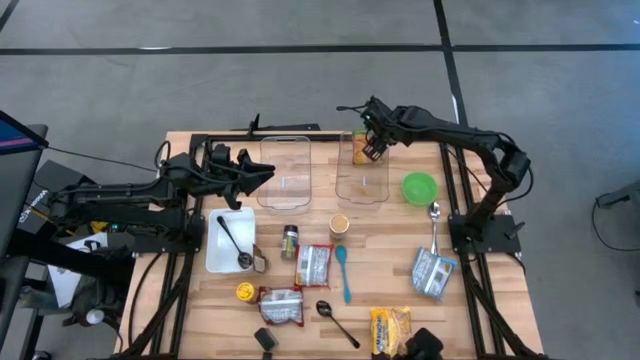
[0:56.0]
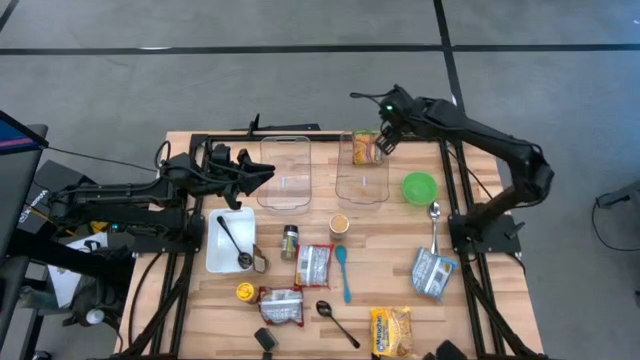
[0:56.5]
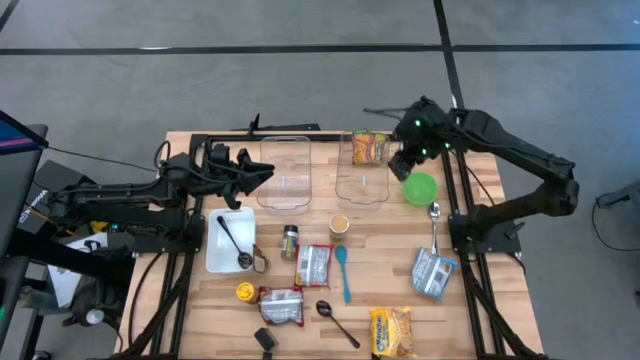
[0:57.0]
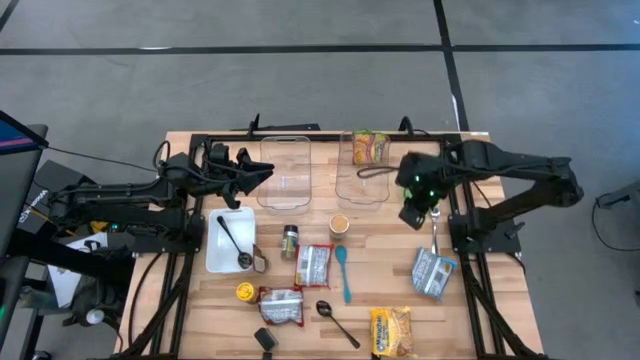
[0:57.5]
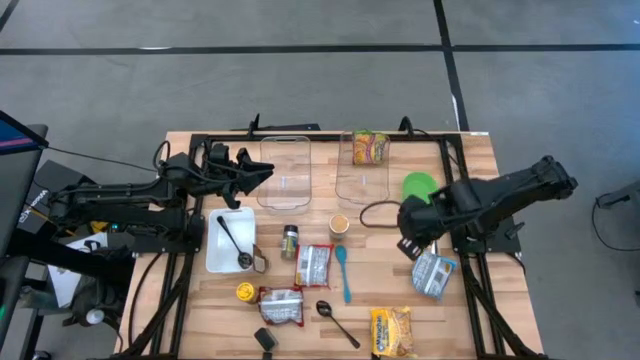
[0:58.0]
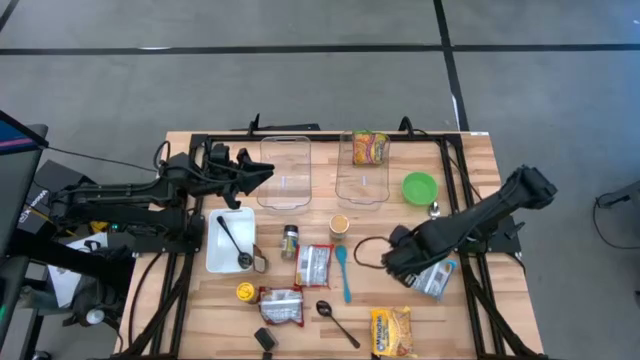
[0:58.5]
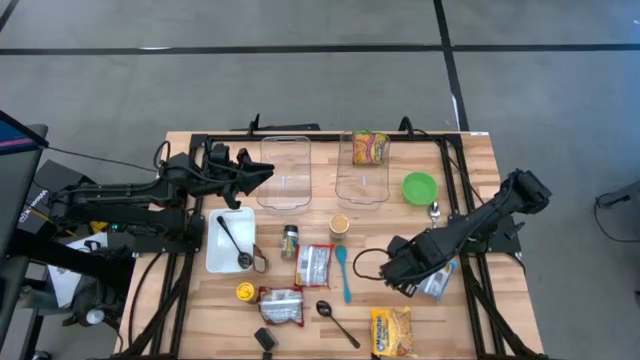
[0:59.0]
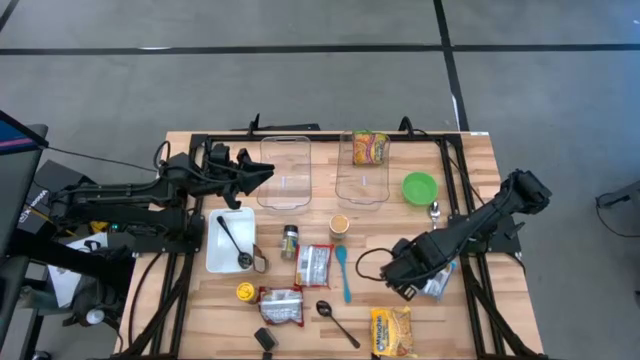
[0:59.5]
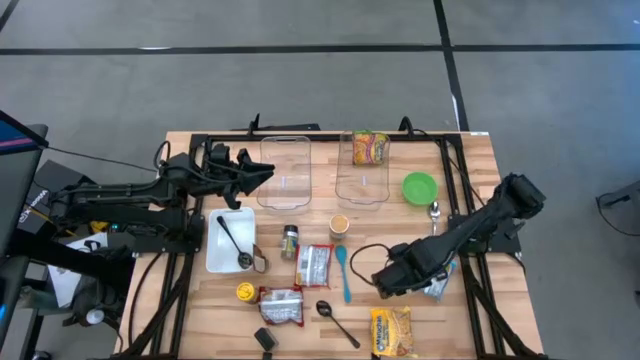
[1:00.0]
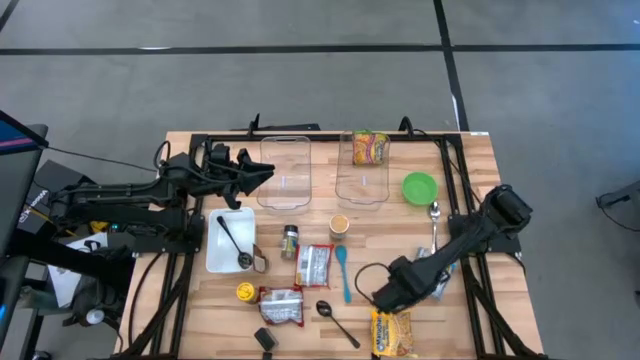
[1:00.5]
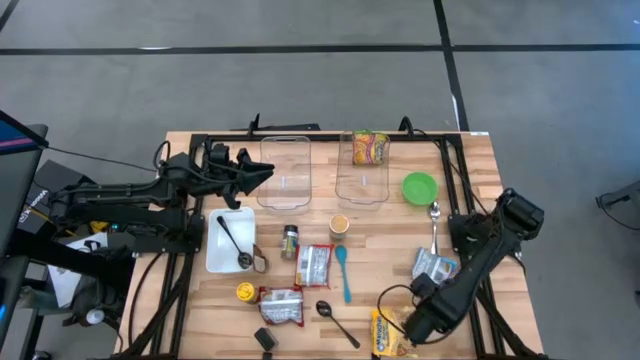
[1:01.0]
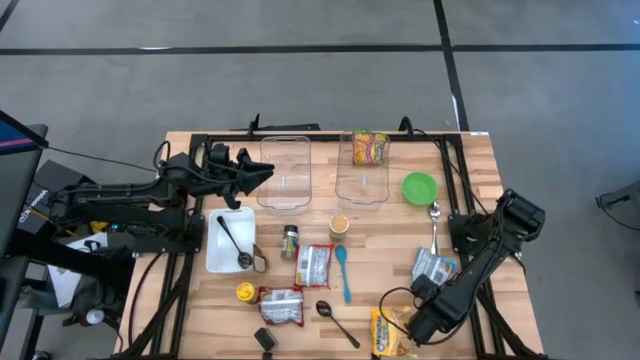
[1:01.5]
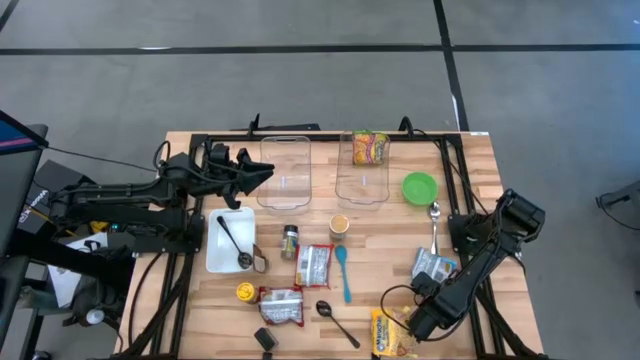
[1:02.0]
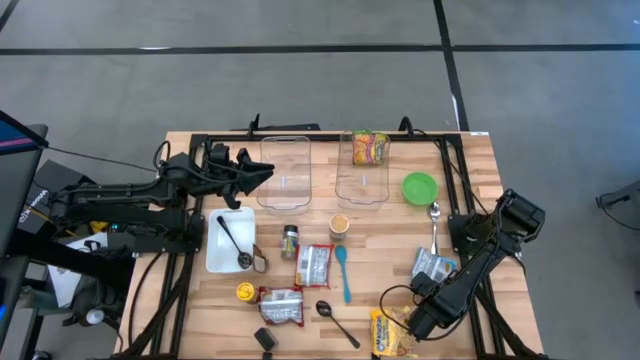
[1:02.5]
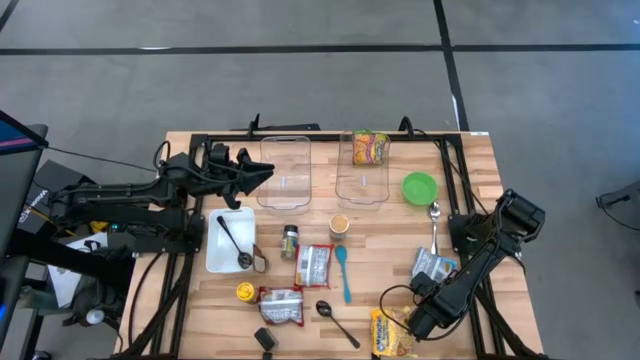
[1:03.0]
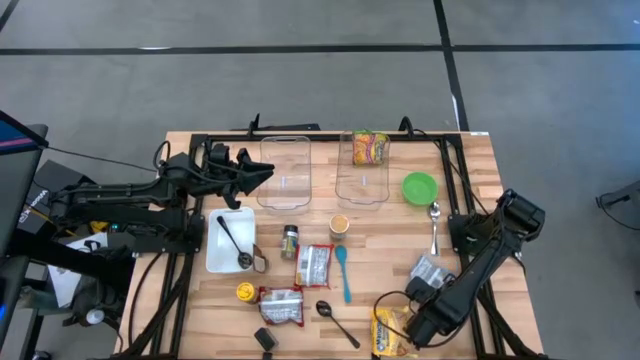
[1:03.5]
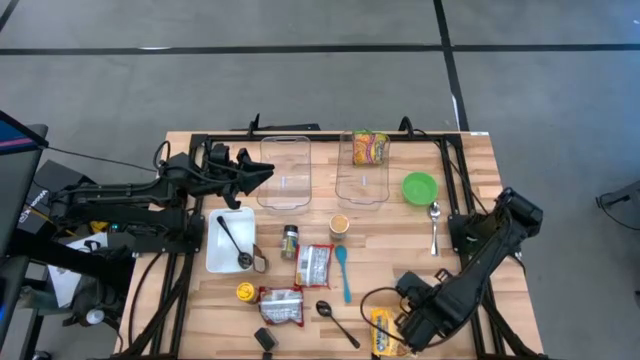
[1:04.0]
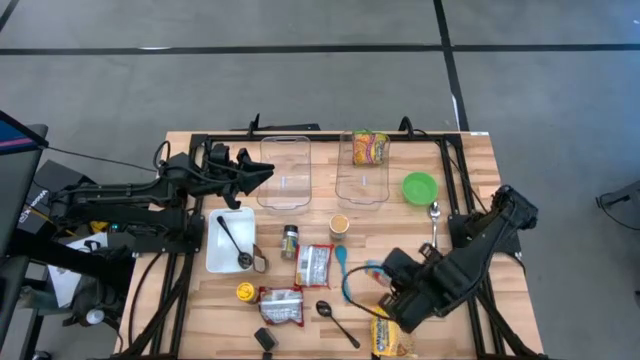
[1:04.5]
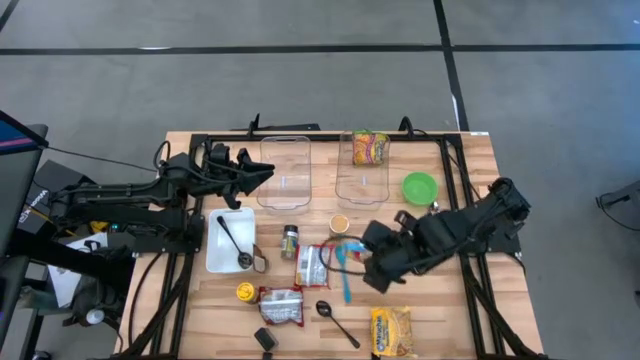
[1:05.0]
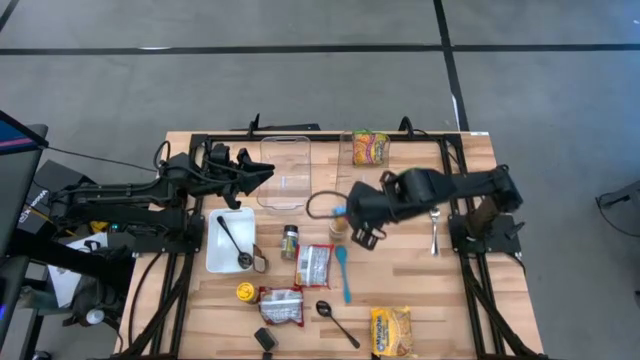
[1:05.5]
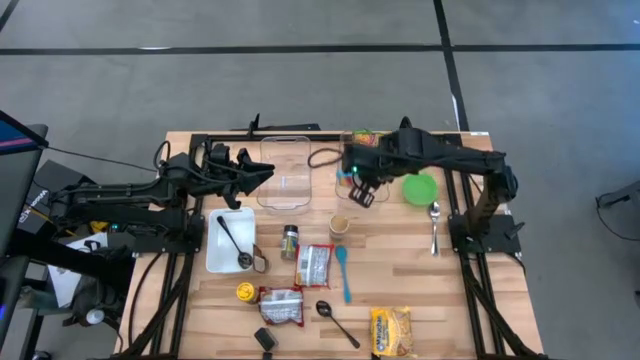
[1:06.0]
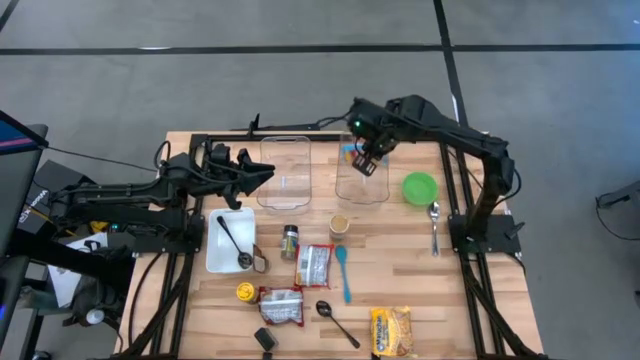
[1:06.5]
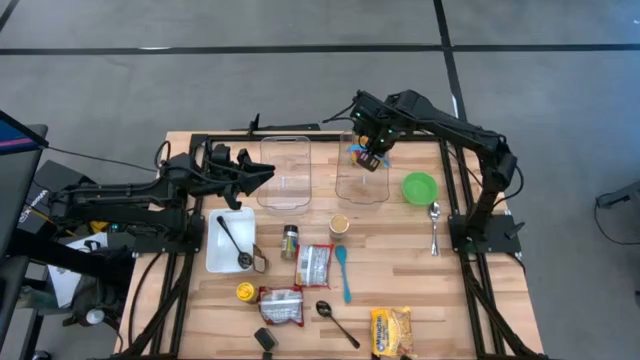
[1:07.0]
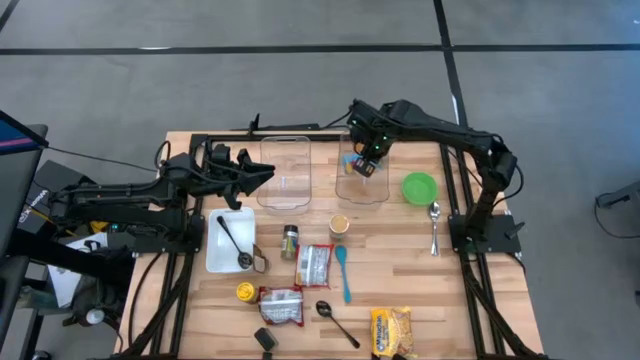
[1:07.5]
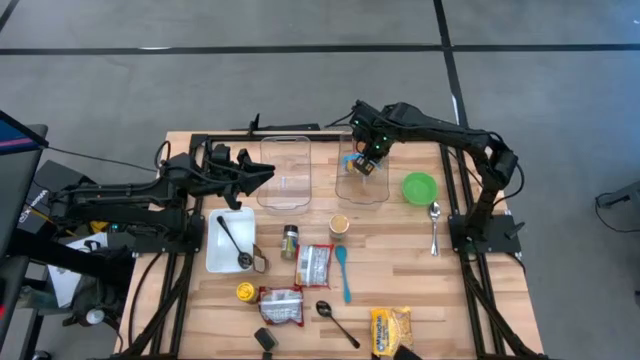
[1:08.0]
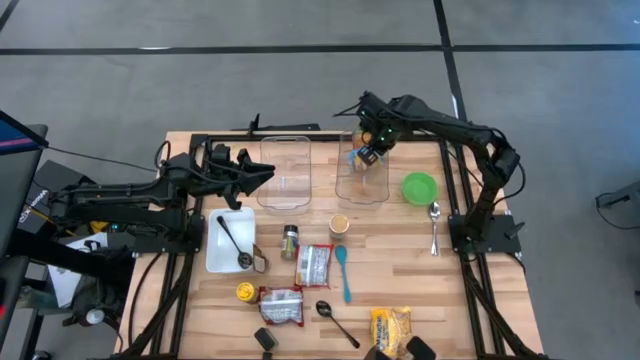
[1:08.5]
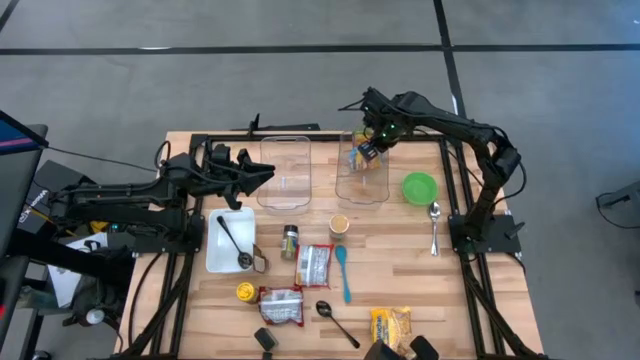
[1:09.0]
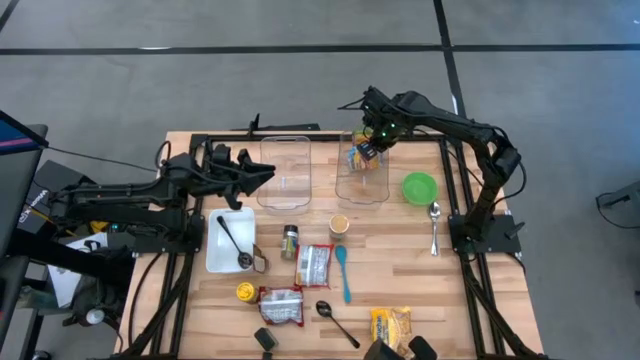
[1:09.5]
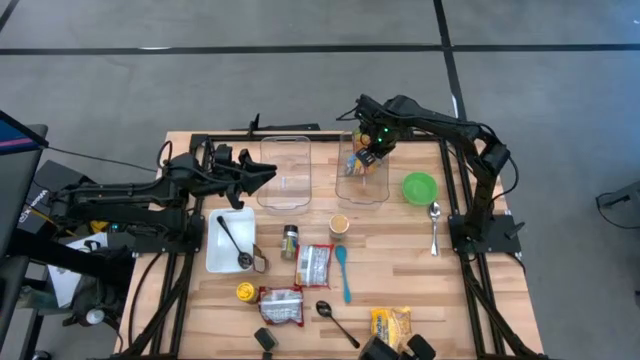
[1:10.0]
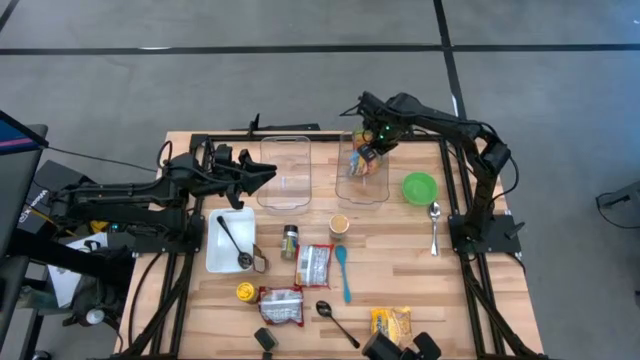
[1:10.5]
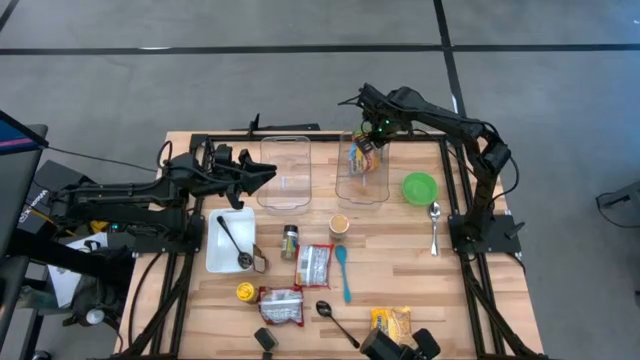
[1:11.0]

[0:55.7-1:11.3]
Task: Pick & Place Food Item
Put the blue noodle pack into the right transparent bin

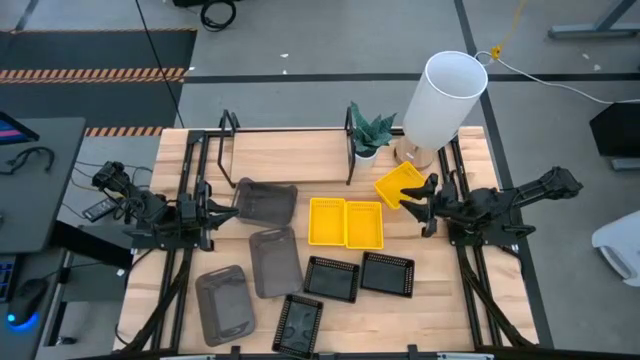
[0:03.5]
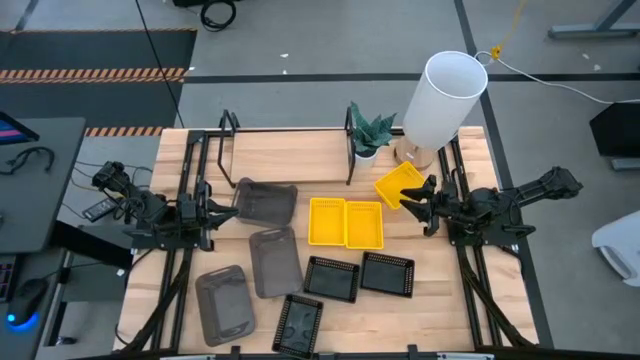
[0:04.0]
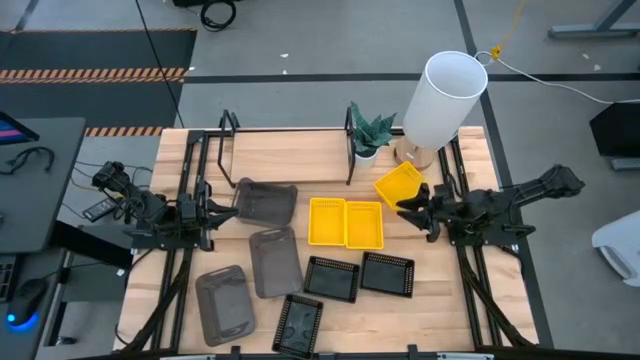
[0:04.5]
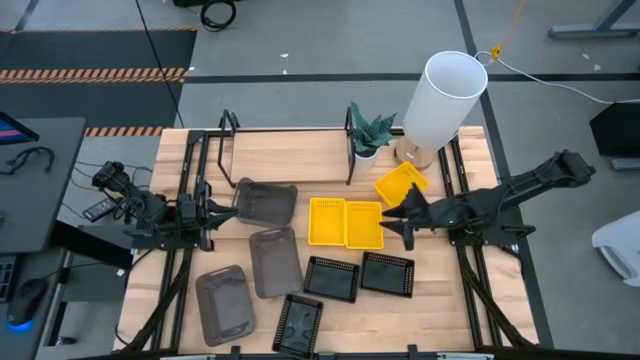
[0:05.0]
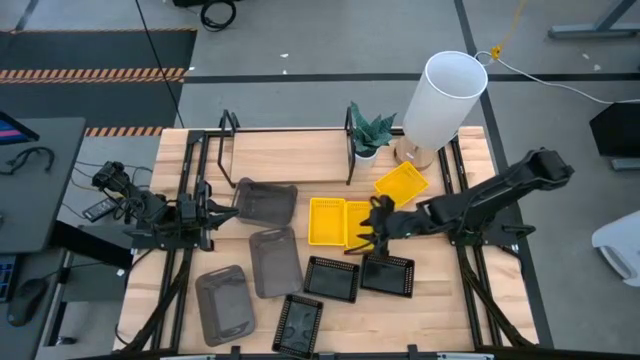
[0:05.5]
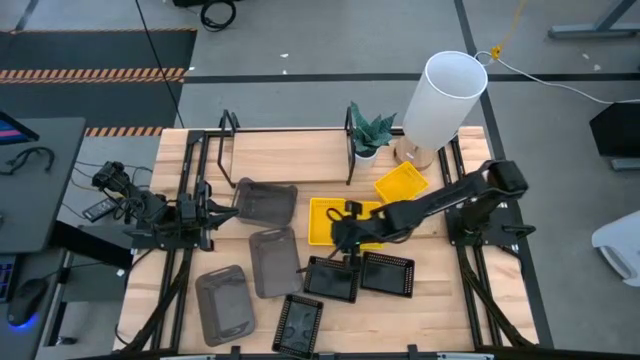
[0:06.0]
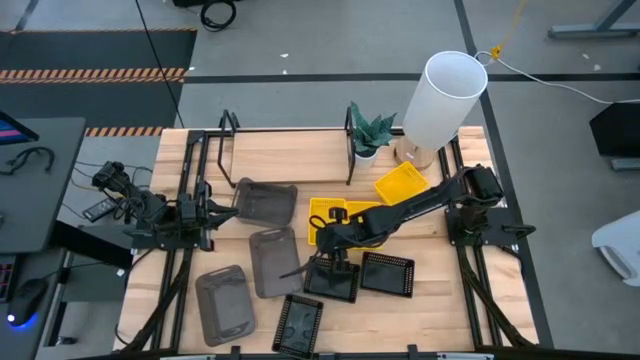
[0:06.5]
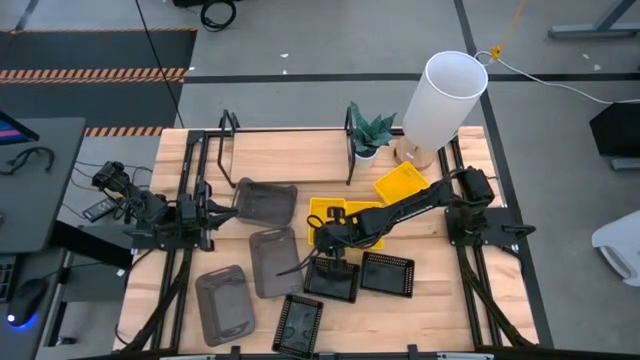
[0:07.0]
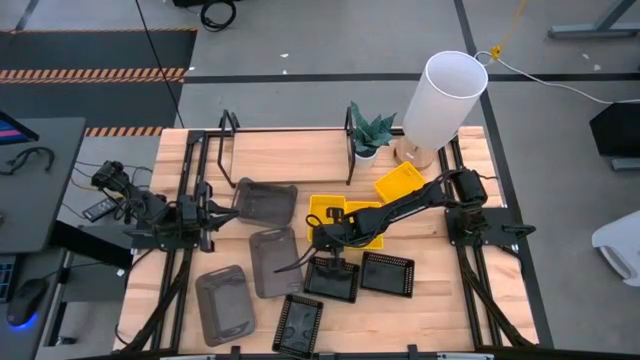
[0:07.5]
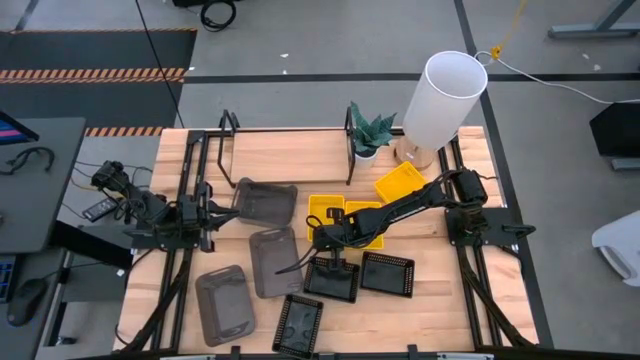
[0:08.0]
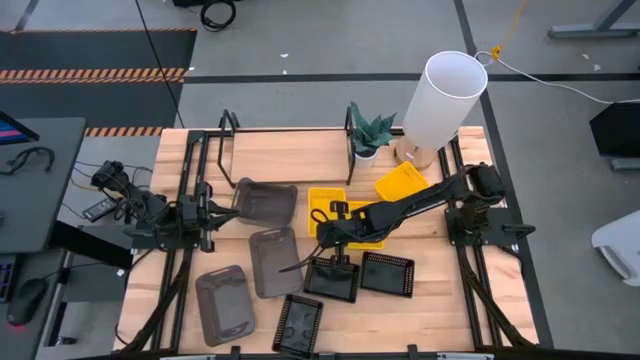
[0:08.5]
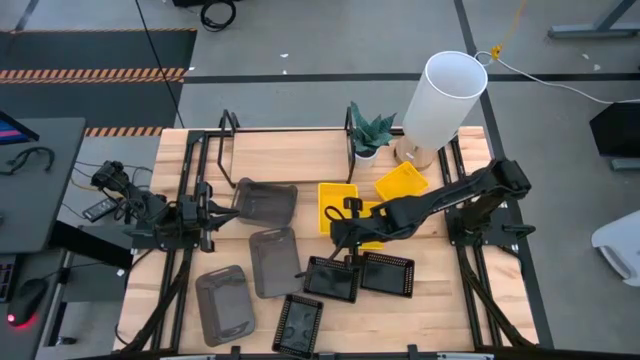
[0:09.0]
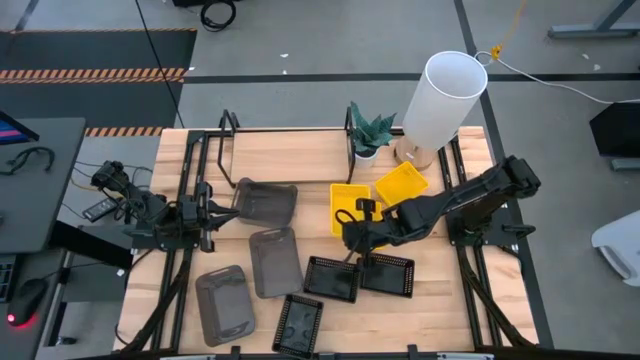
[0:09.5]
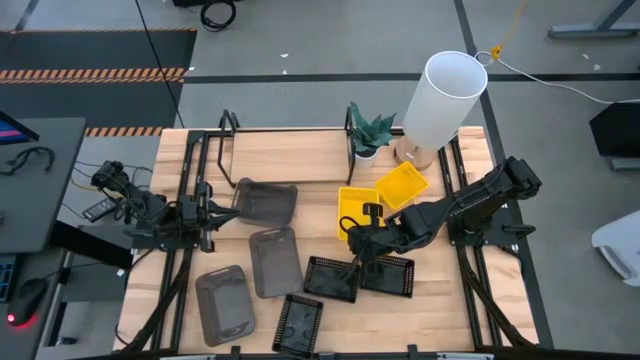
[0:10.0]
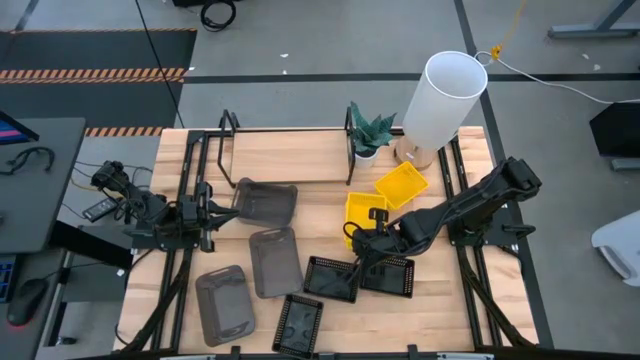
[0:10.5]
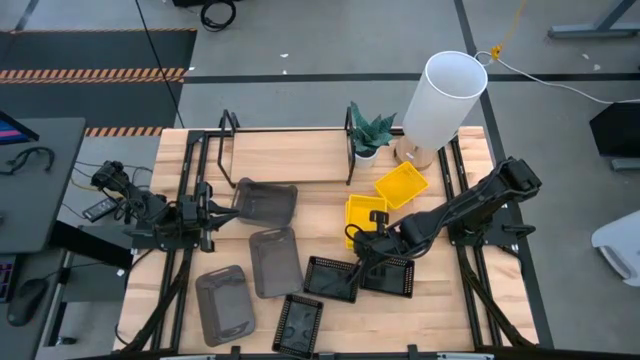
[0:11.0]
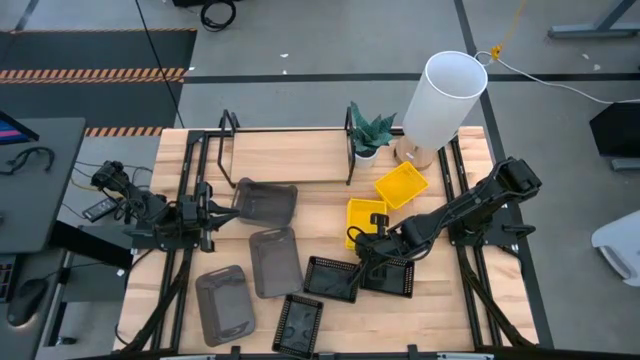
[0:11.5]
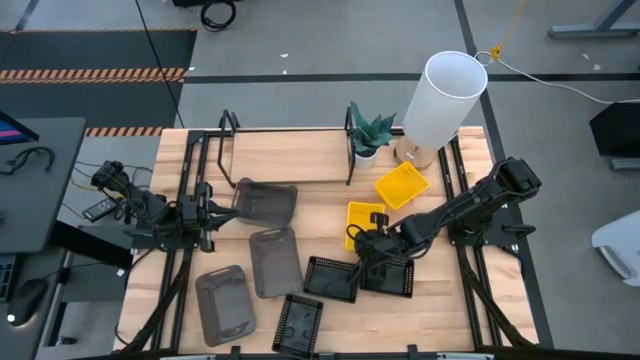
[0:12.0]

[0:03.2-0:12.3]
Task: Stack baskets on shelf by color
Stack the bottom left yellow basket on top of the bottom right yellow basket
